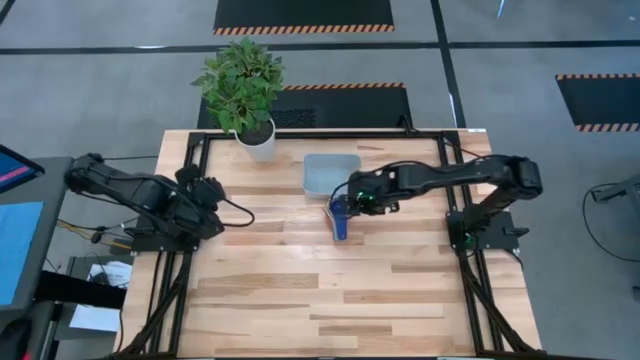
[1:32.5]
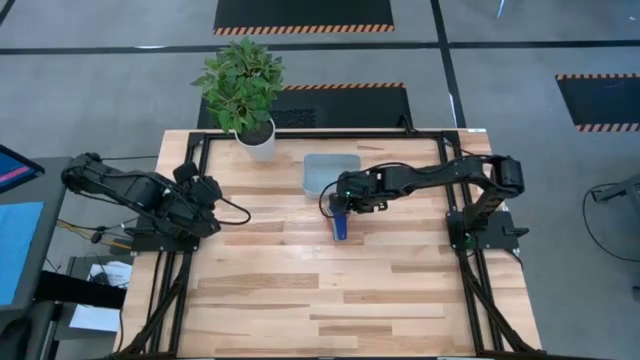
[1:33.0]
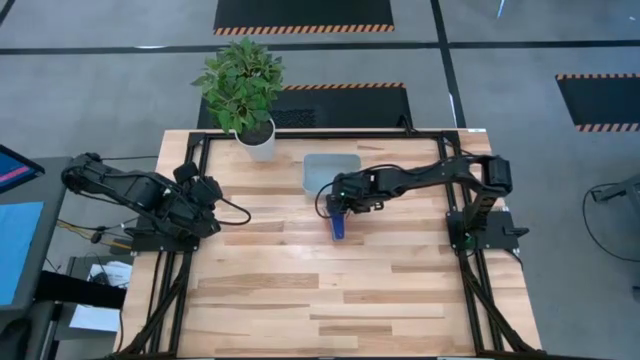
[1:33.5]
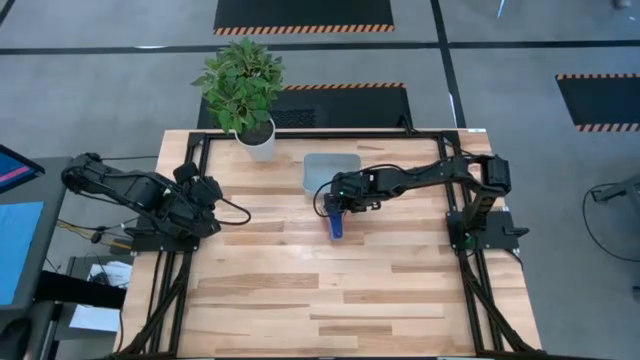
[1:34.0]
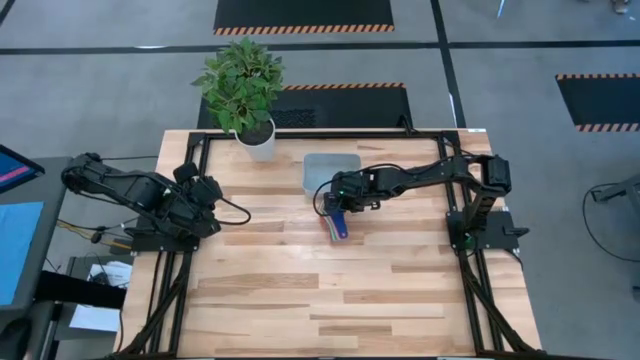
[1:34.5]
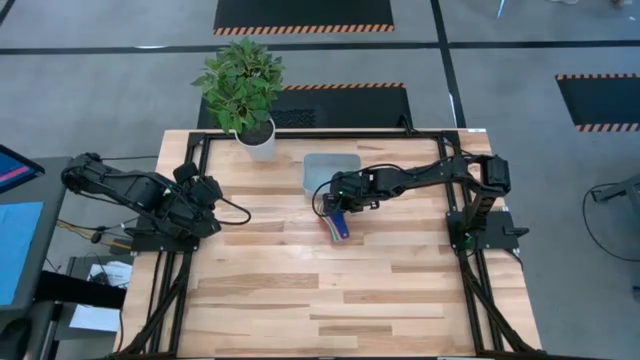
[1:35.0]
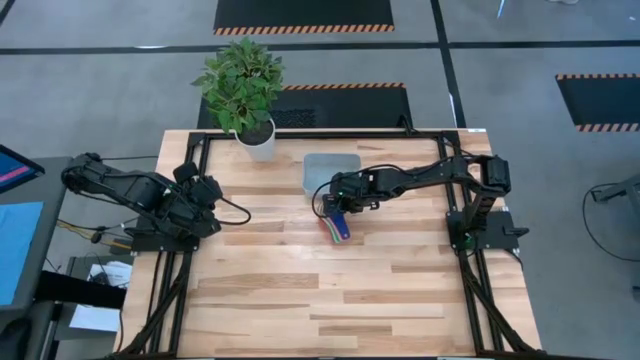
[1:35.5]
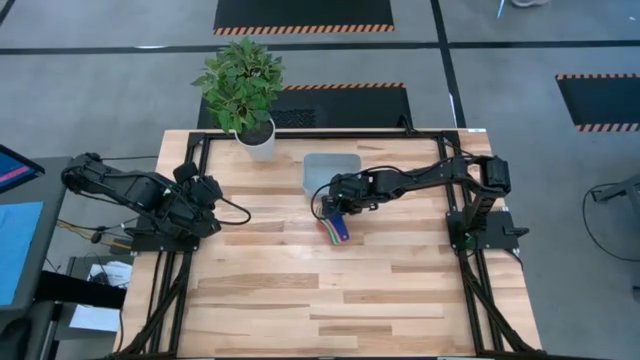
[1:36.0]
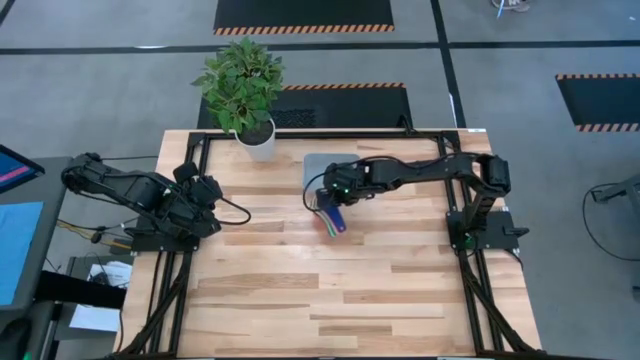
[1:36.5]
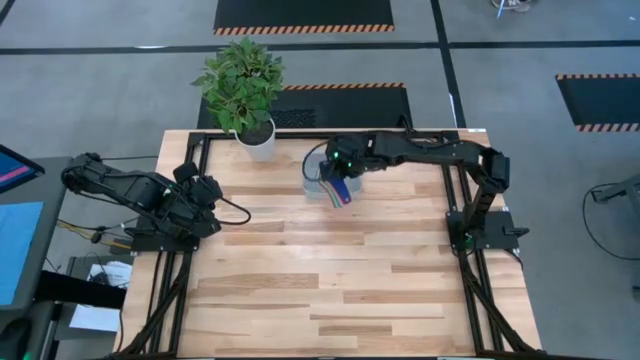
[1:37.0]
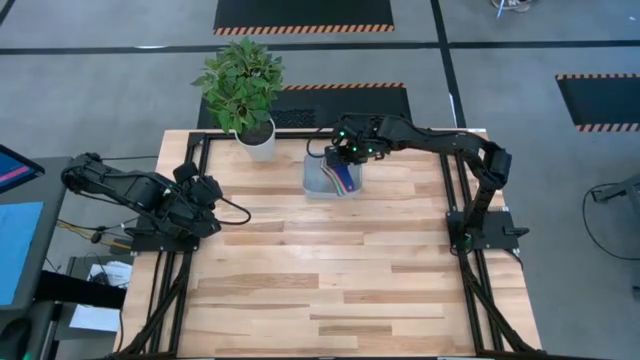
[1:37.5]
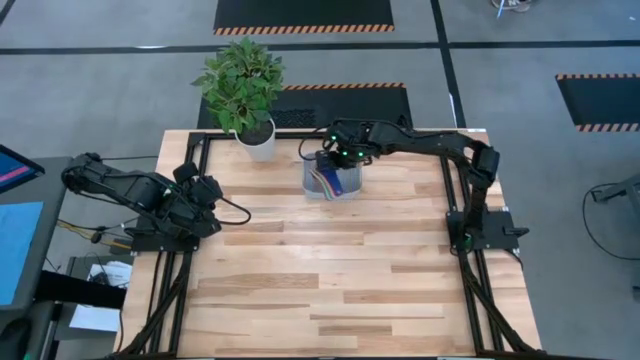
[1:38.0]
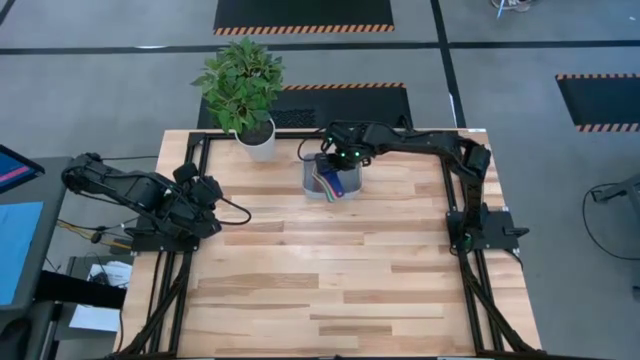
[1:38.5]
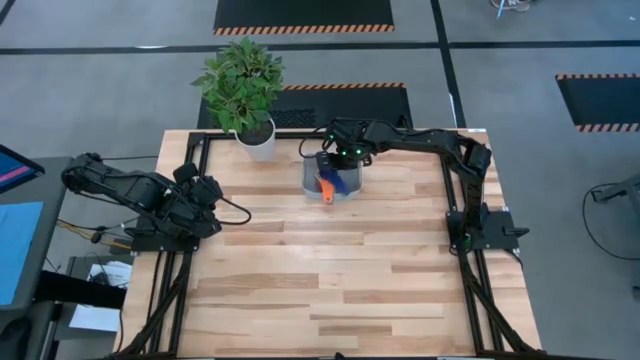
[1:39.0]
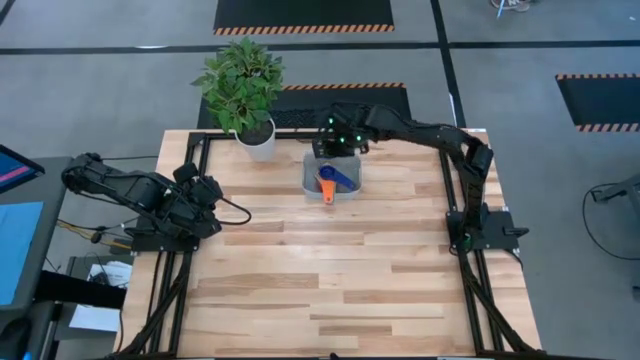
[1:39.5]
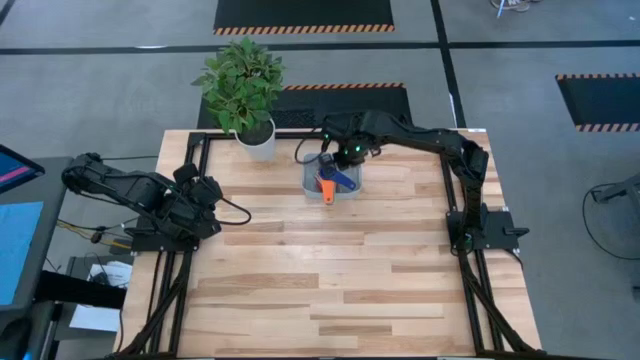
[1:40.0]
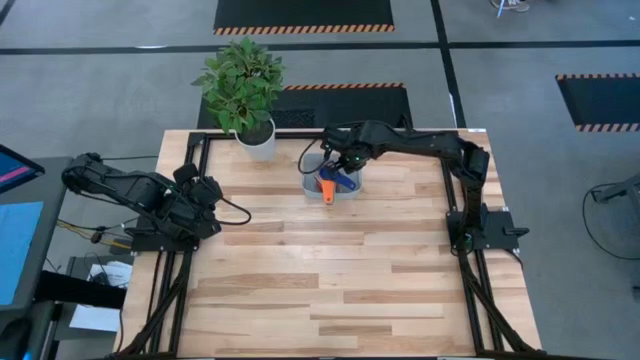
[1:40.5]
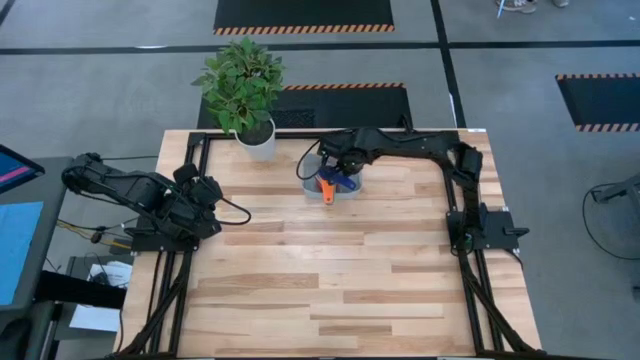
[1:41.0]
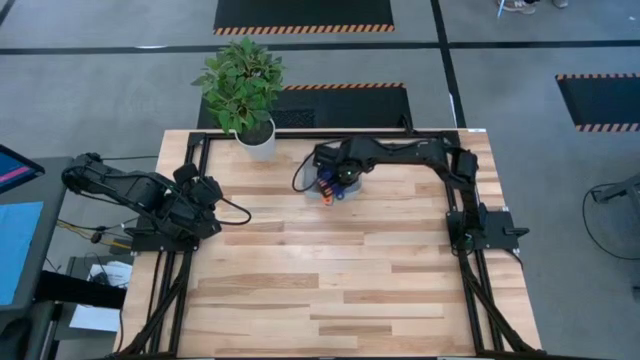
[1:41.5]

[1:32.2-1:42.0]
Task: Nest measuring cups in basket
Put the nested measuring cups into the gray bin

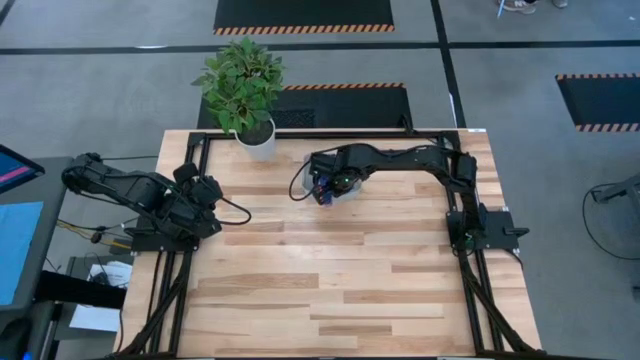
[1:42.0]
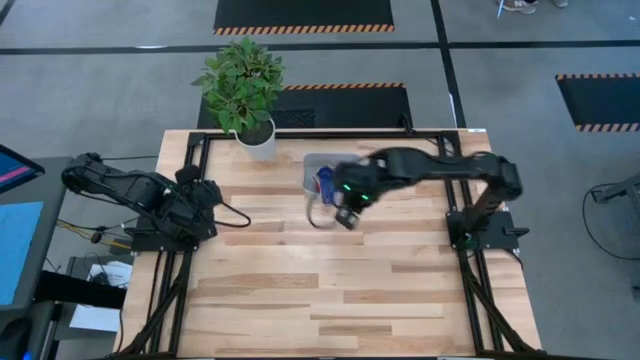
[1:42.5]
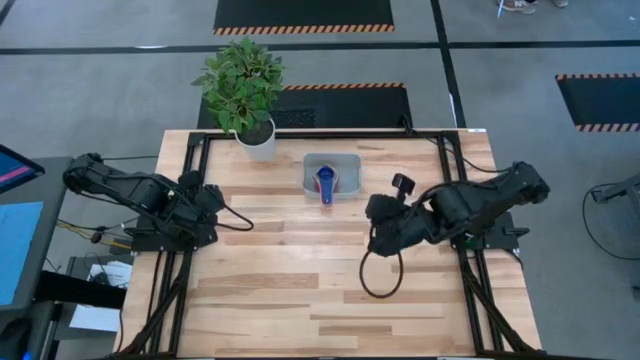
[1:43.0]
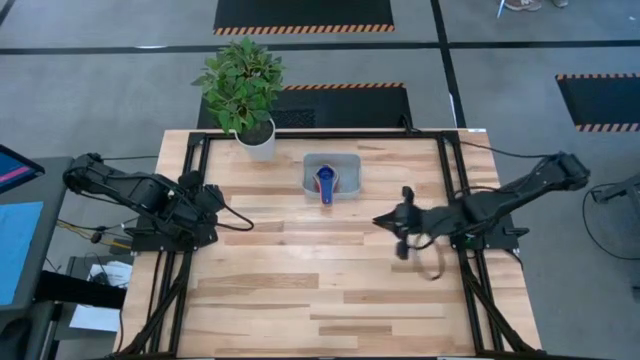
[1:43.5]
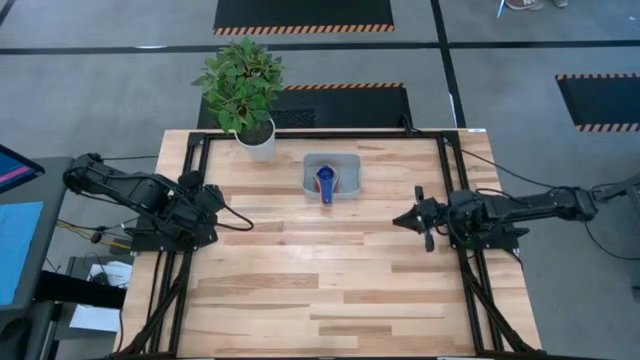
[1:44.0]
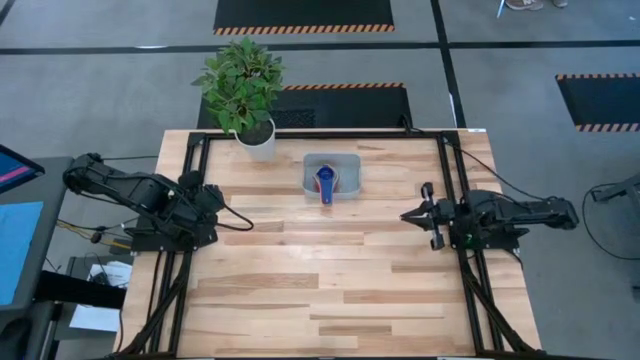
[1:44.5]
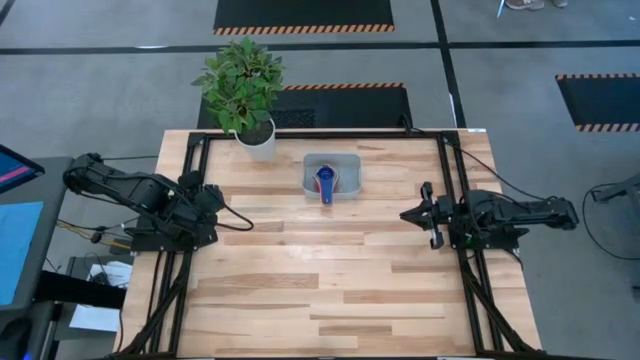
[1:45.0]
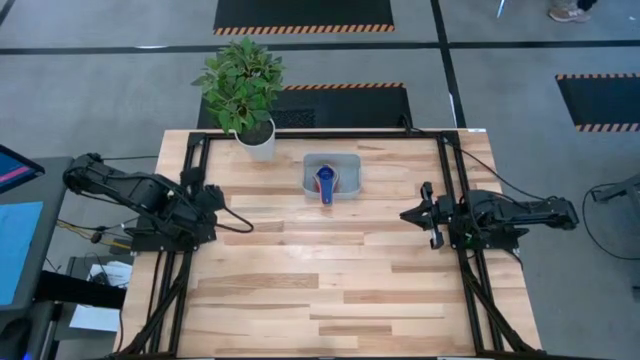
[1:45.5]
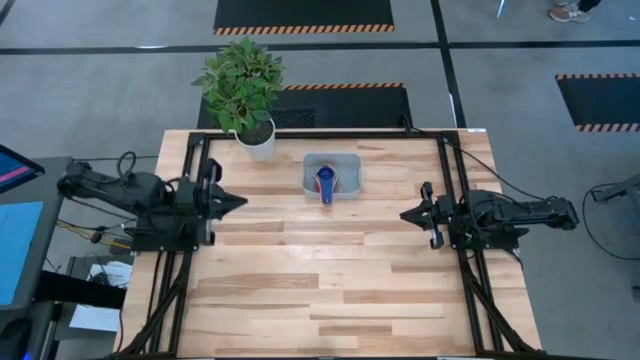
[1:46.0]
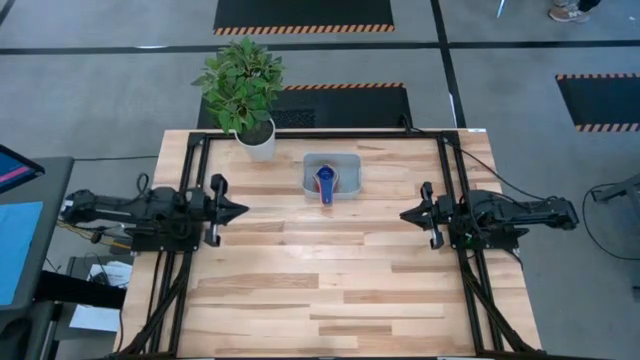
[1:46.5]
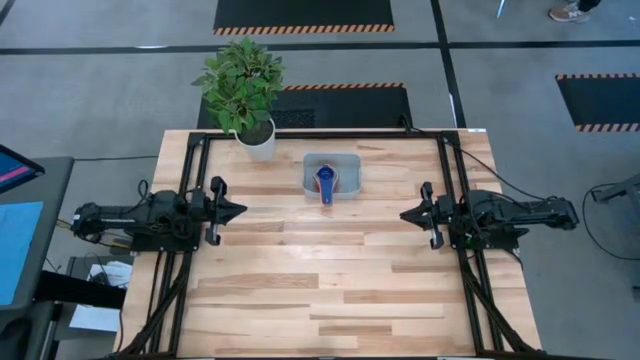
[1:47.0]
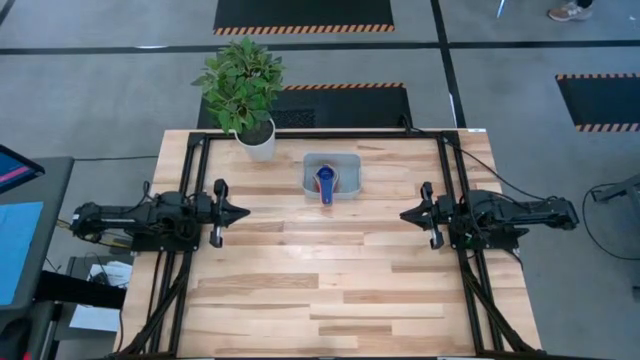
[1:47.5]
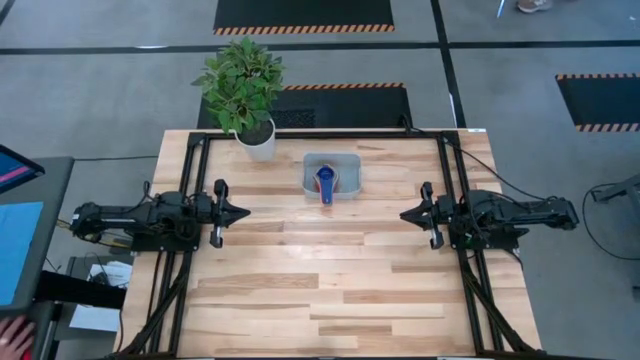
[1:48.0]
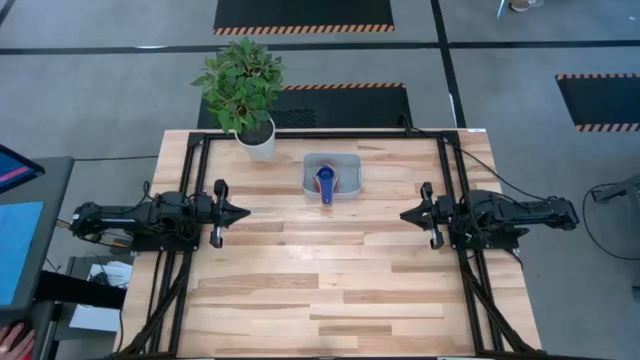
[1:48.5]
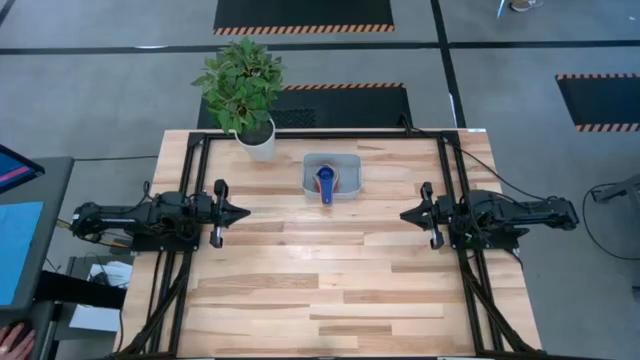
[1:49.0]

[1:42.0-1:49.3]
Return to Home Position

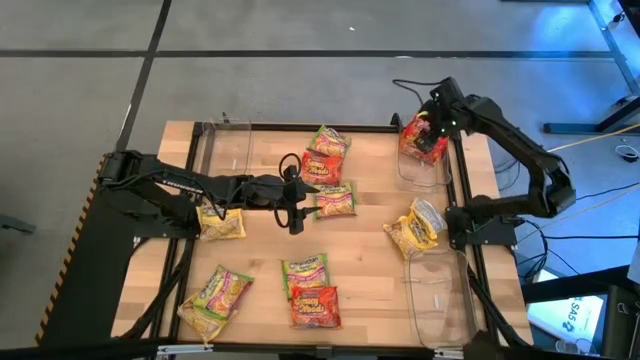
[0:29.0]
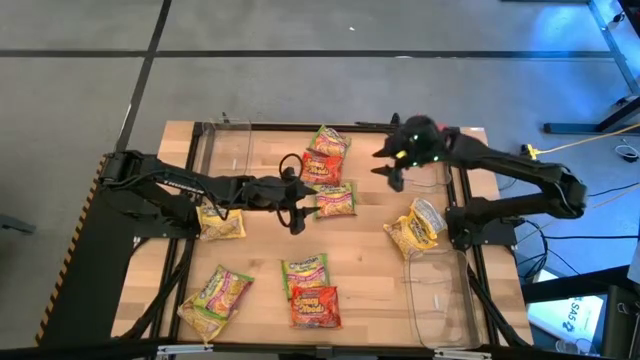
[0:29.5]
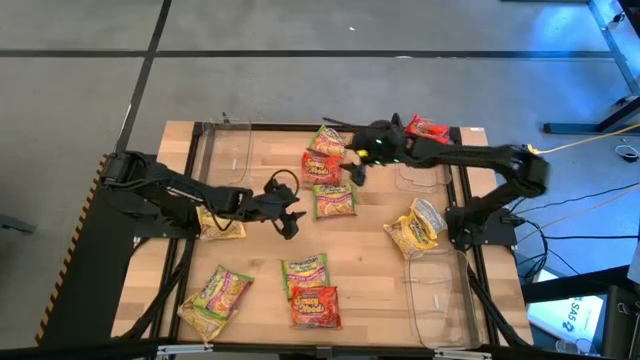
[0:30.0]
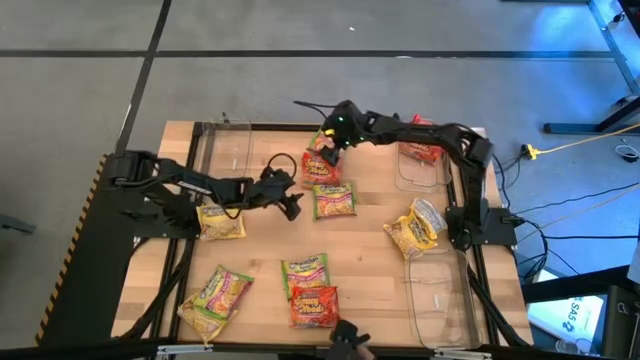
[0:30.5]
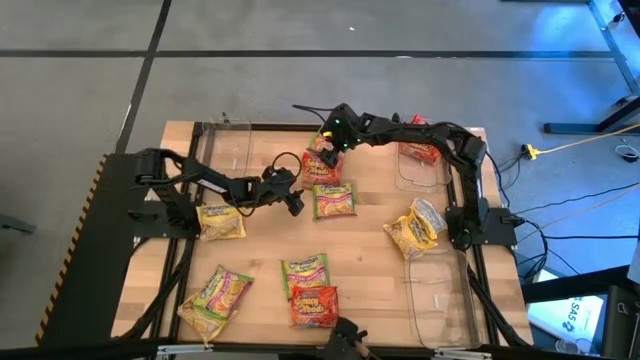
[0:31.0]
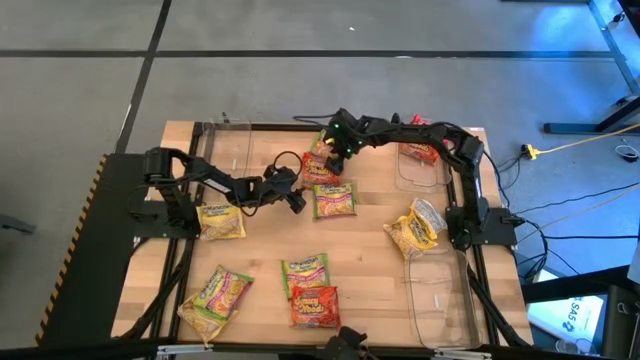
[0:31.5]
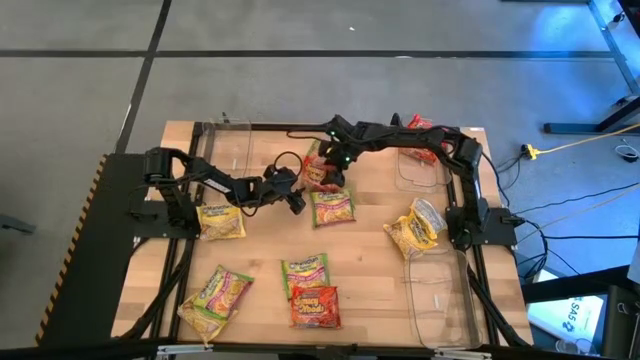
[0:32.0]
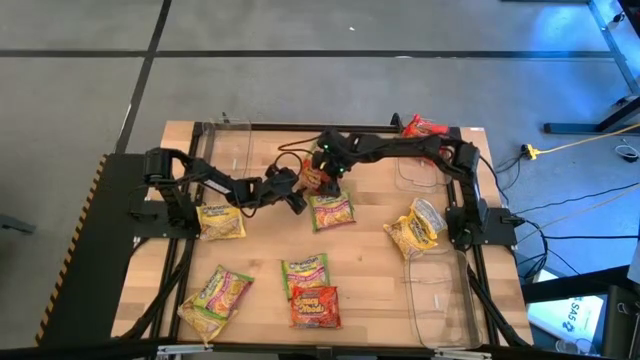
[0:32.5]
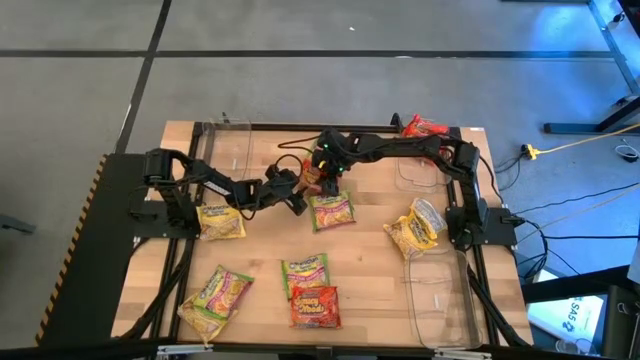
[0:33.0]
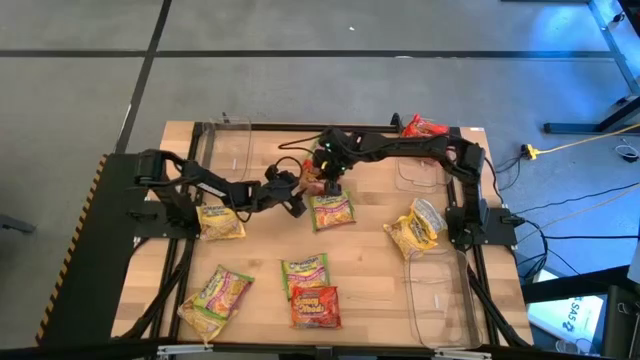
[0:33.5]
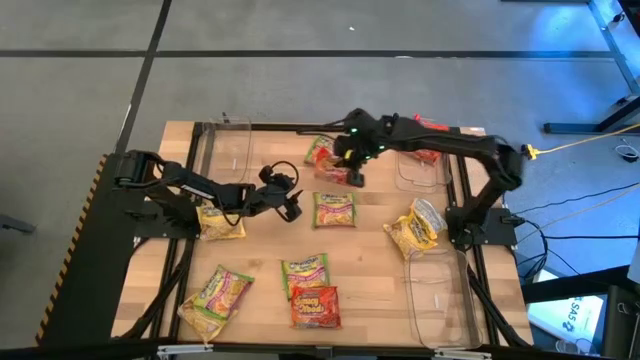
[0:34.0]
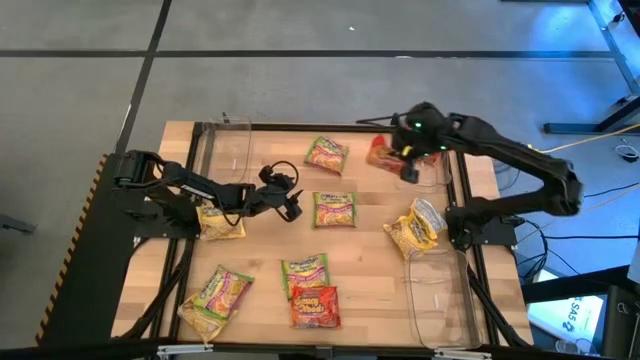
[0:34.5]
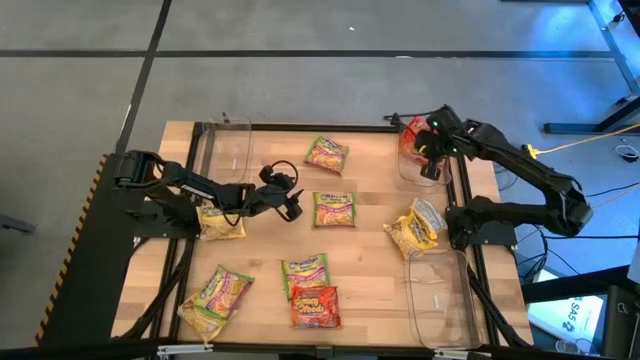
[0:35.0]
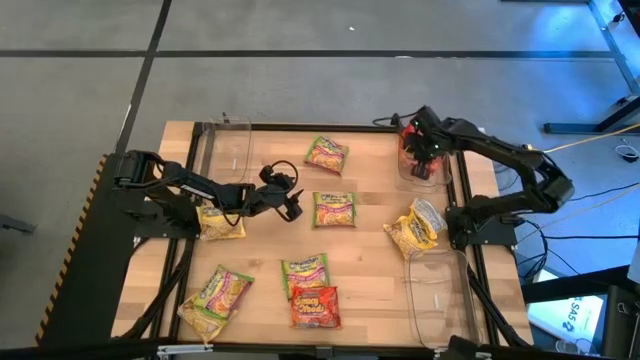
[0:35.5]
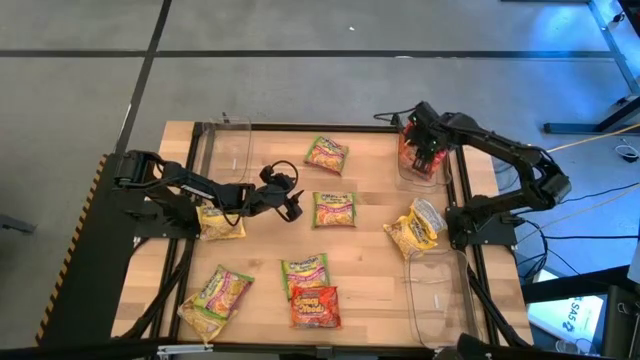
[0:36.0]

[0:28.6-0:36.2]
Task: Sort Maruchan noodles
Put the orange noodle pack into the top right transparent bin
